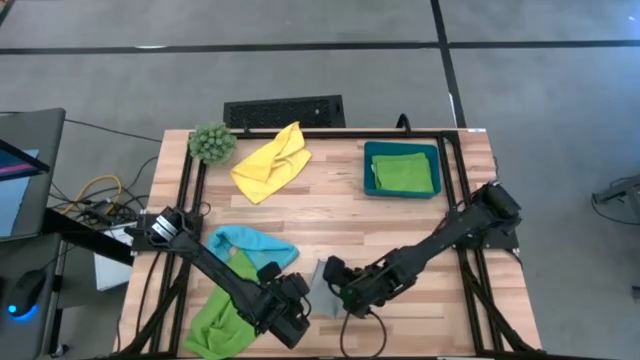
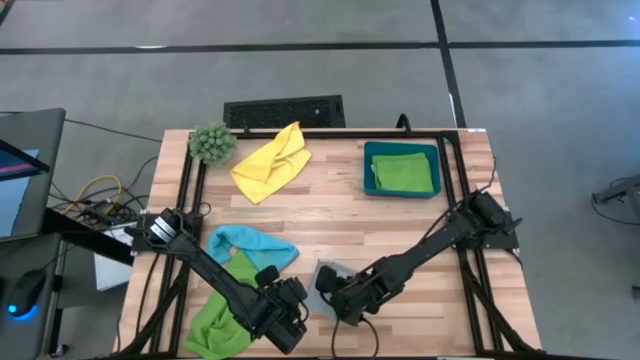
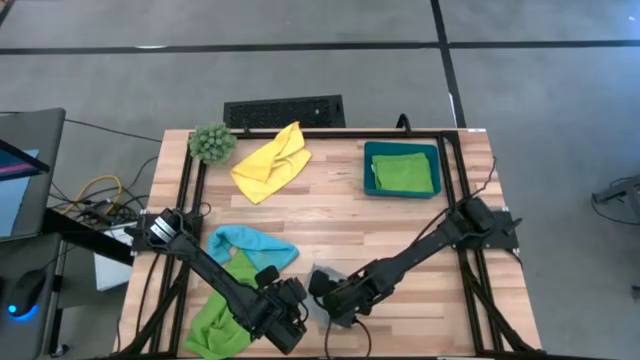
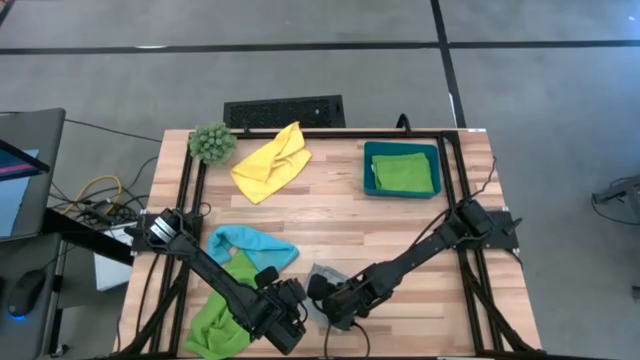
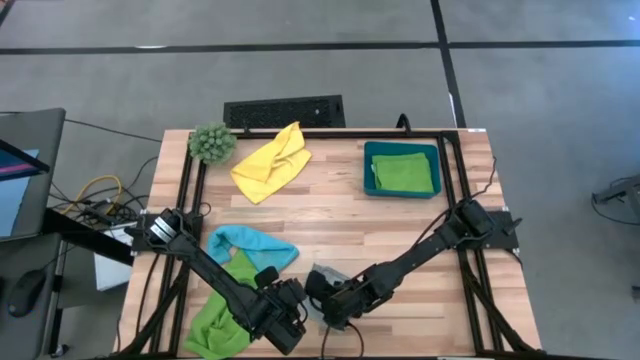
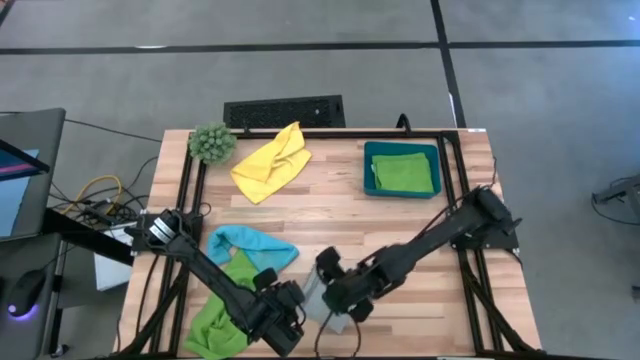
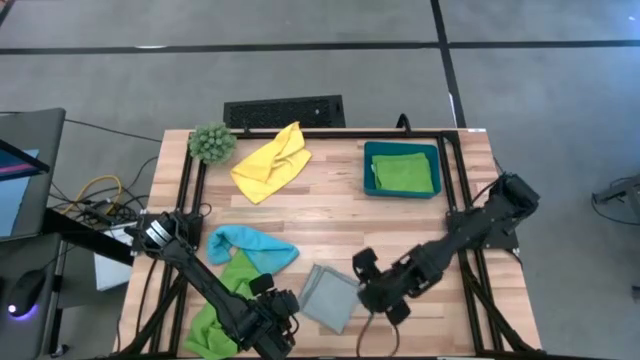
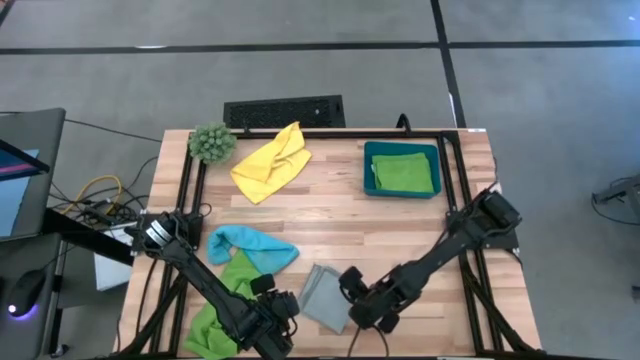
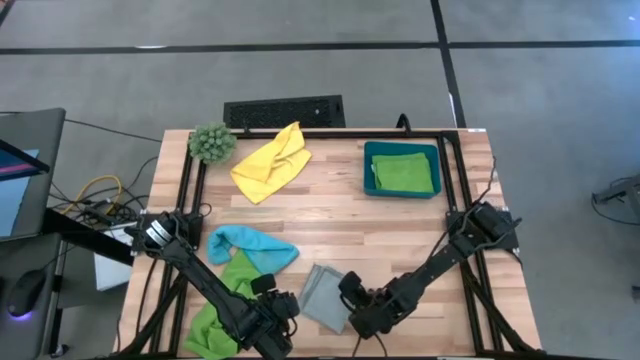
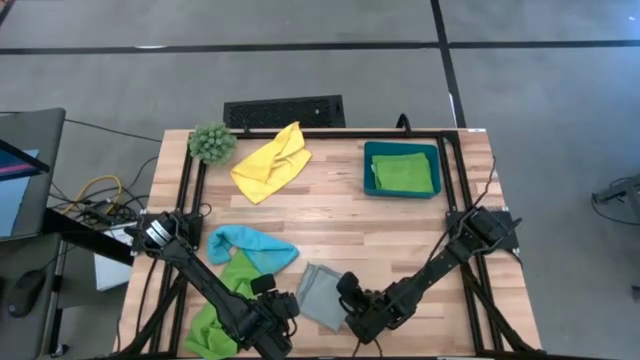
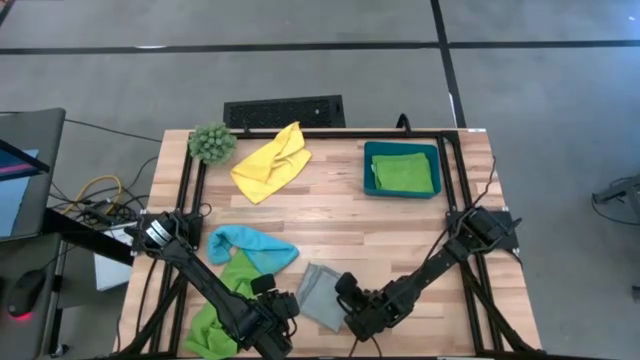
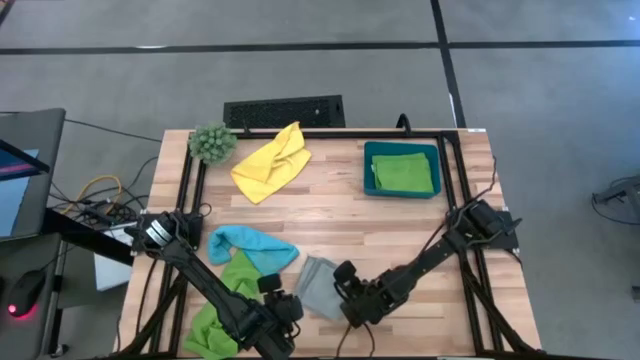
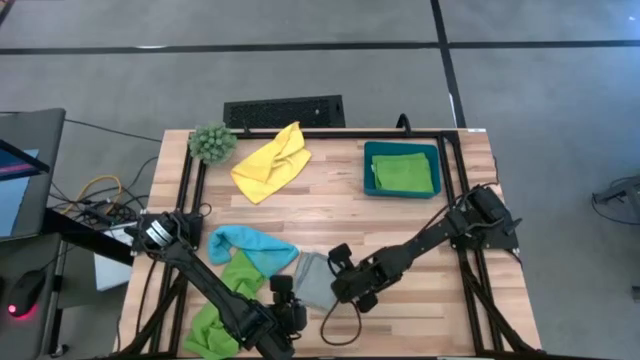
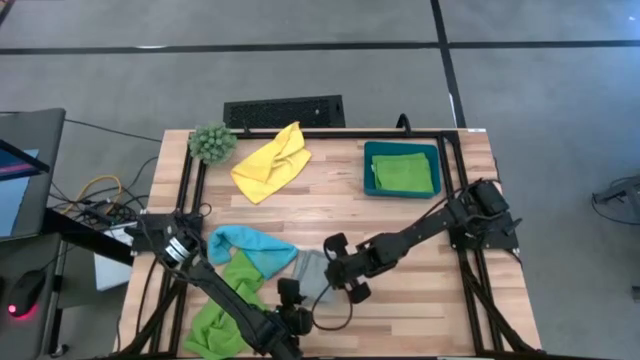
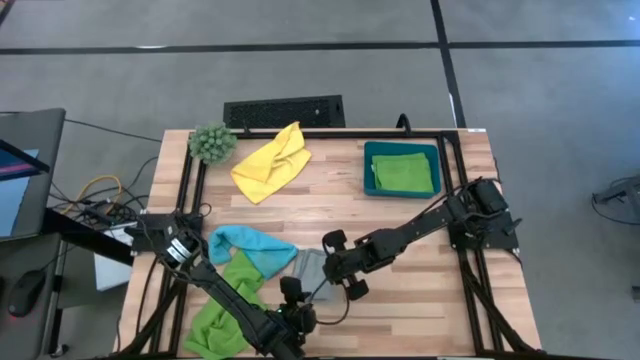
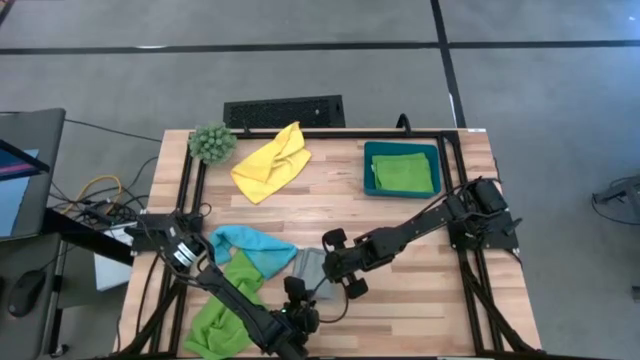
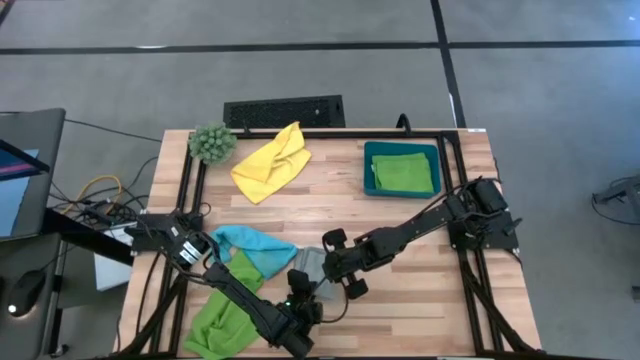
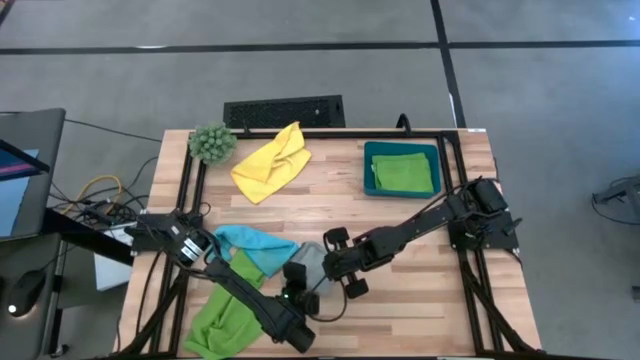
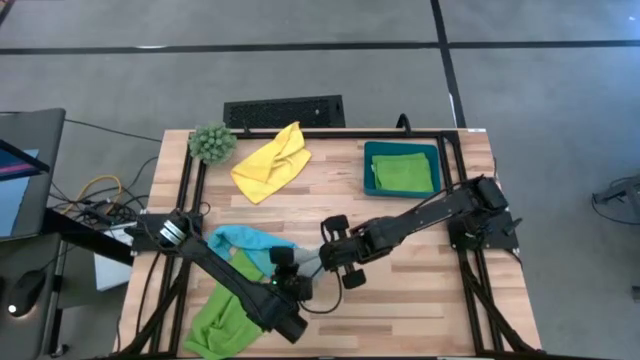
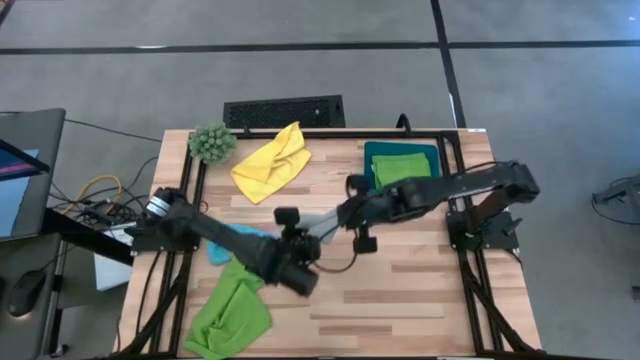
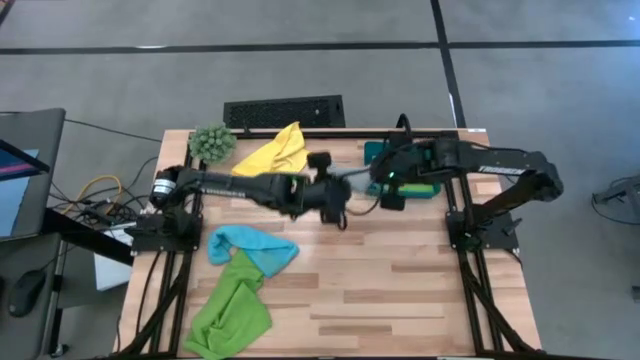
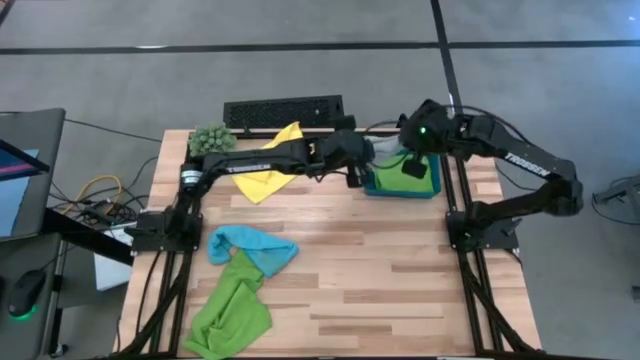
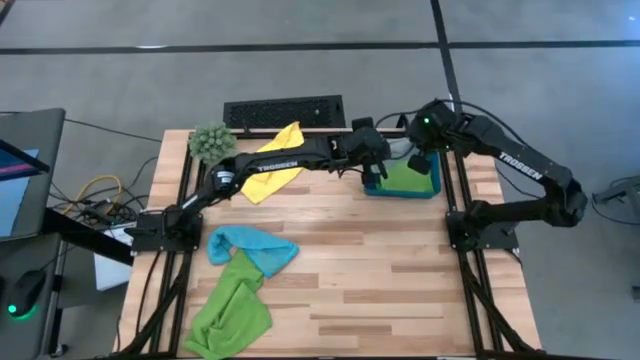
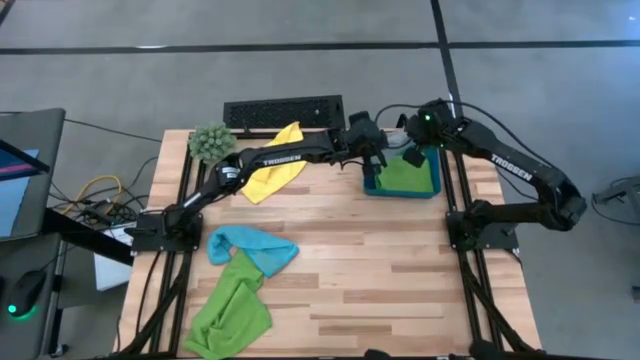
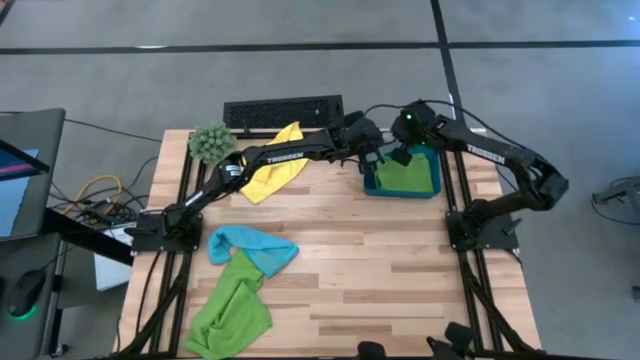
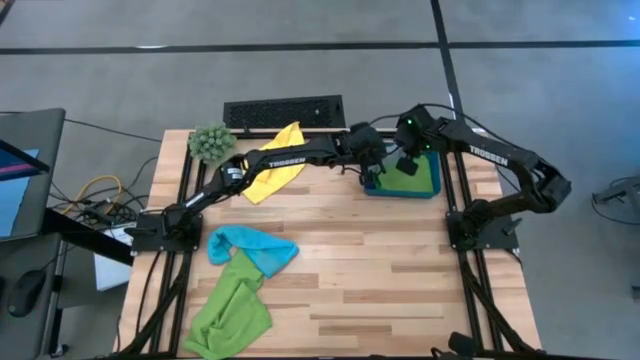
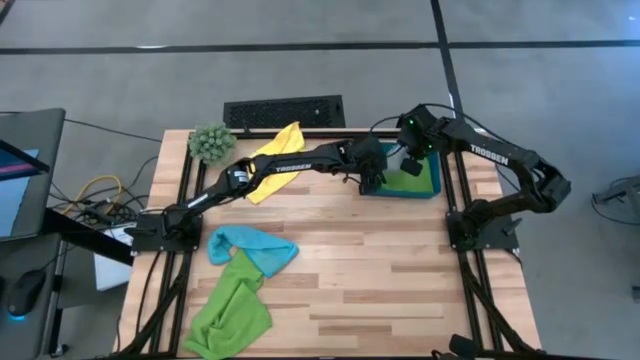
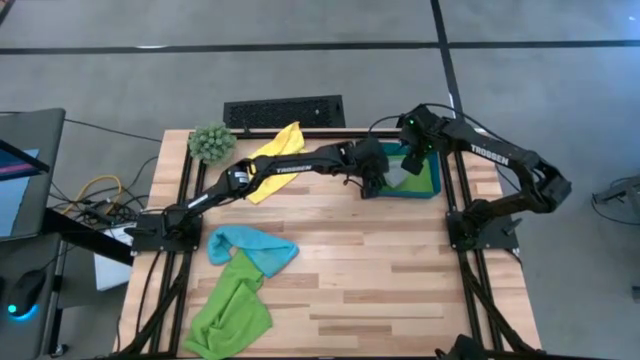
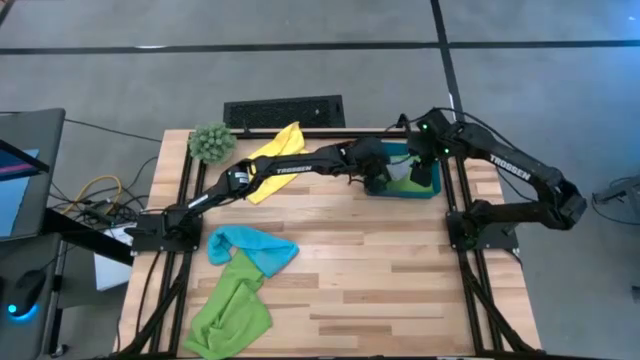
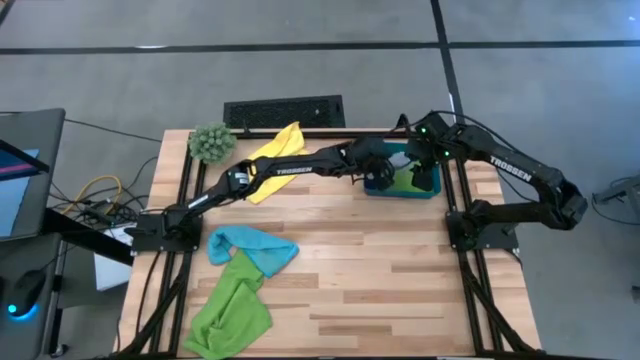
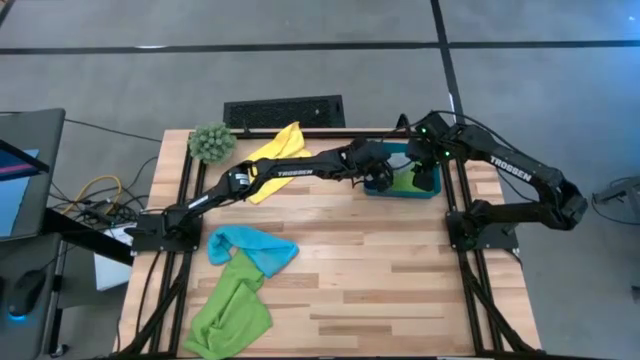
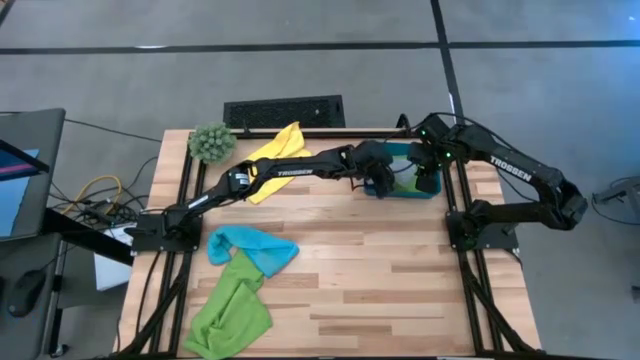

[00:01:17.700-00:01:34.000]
Task: Fold microfiber towels
Fold the dark white microfiber cloth

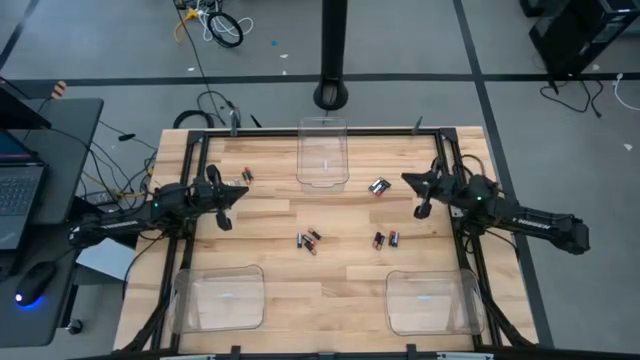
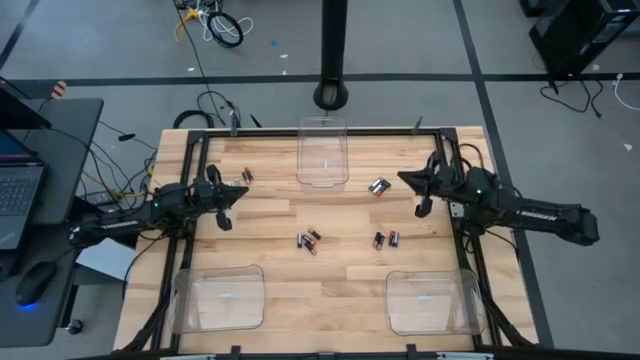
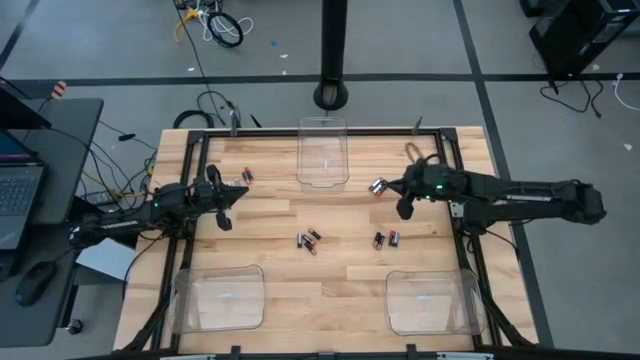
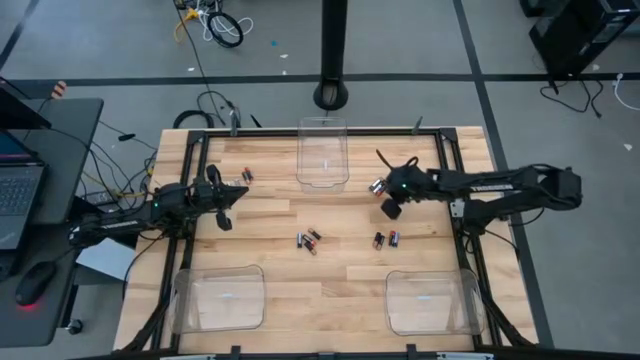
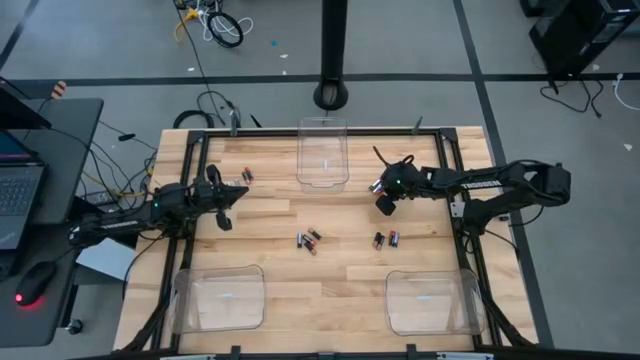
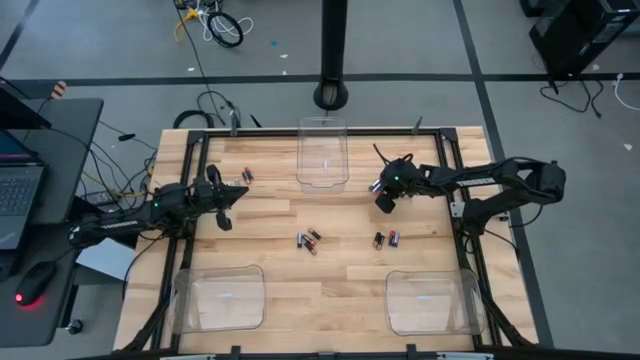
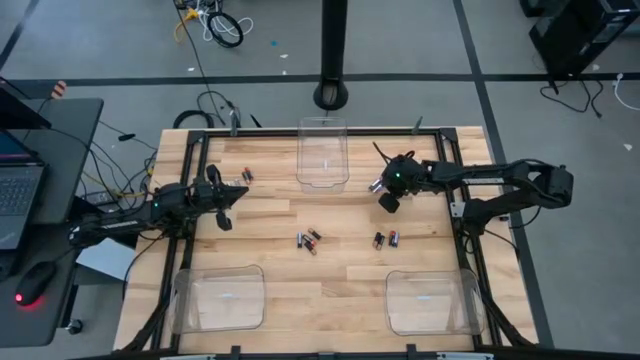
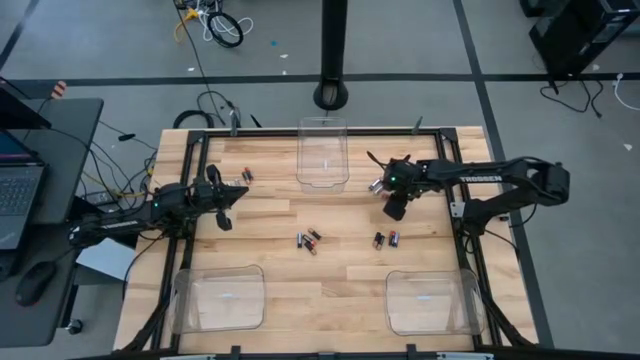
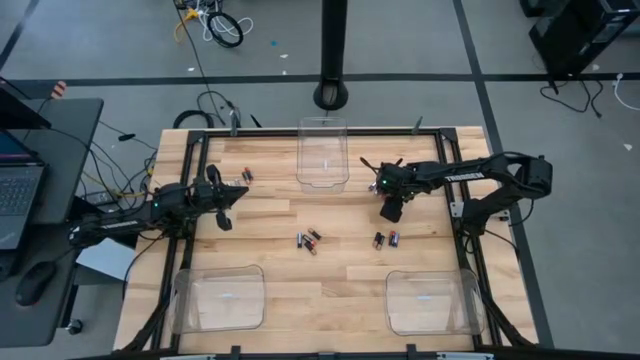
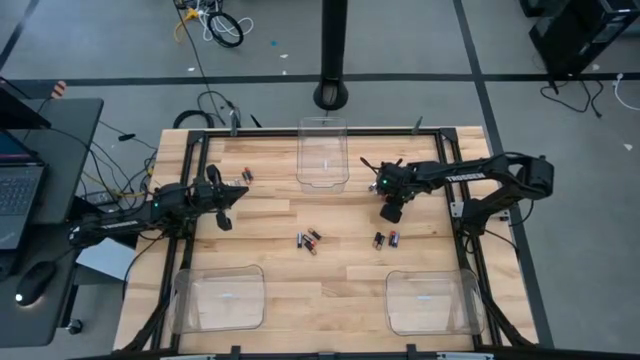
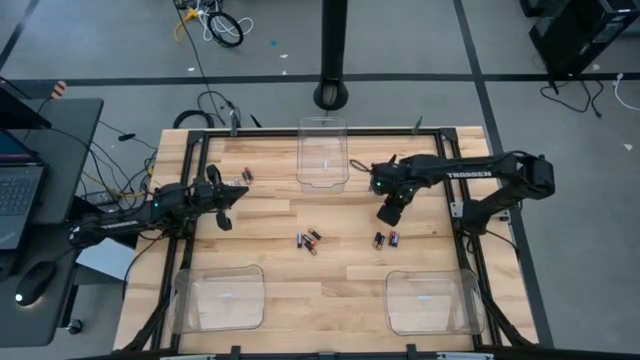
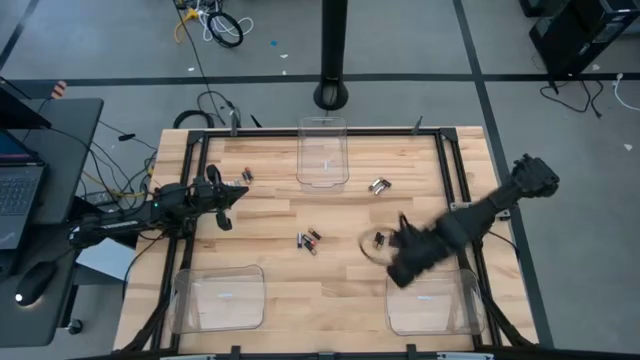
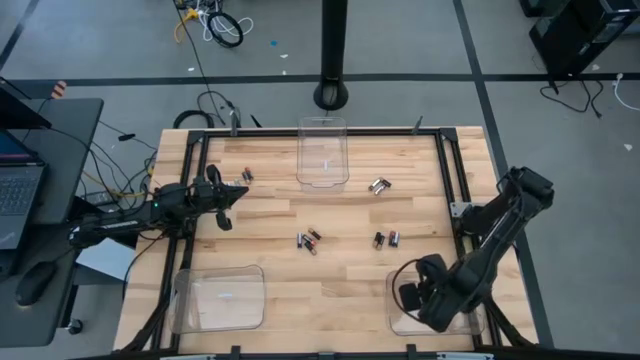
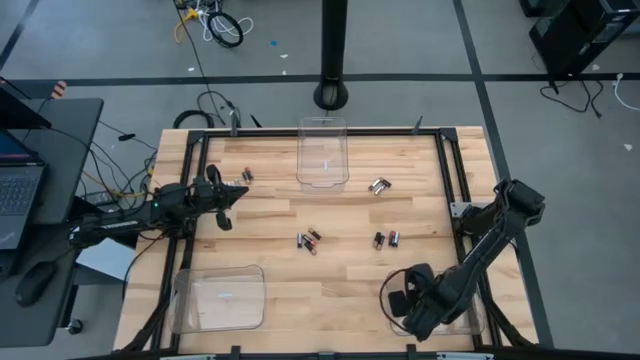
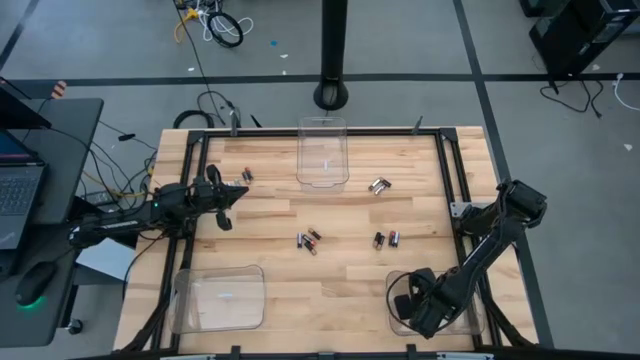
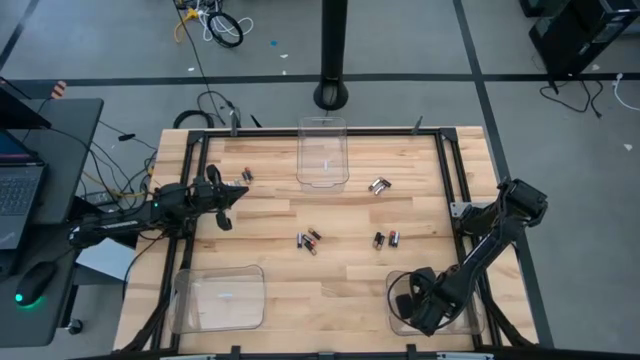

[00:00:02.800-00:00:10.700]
Task: Sort batteries
Put the red battery into the bottom right transparent bin
